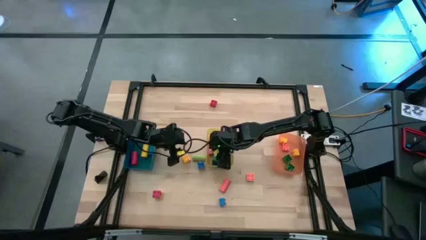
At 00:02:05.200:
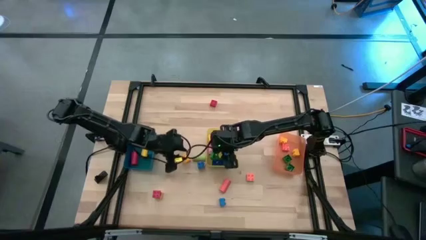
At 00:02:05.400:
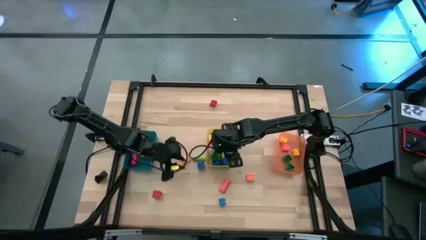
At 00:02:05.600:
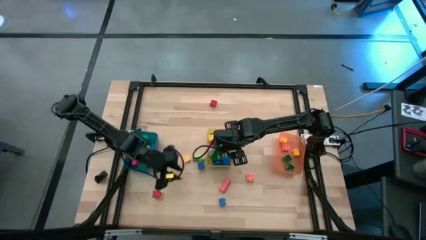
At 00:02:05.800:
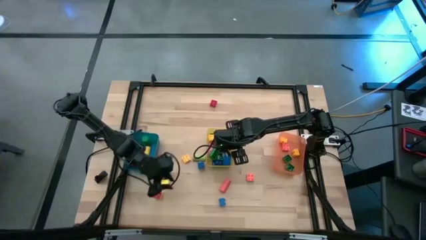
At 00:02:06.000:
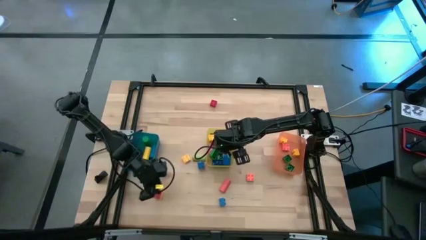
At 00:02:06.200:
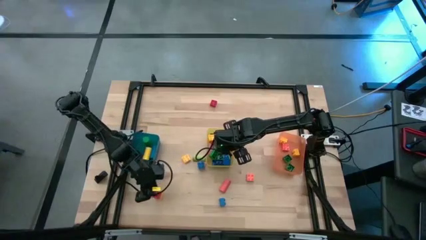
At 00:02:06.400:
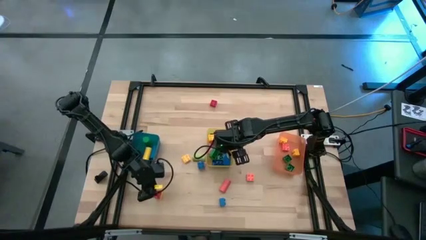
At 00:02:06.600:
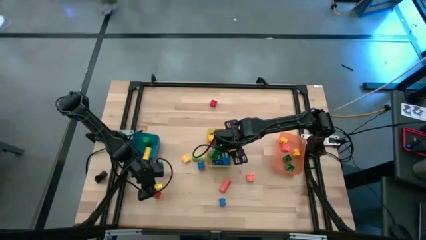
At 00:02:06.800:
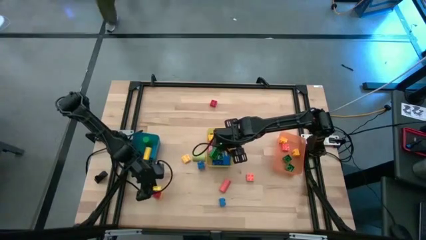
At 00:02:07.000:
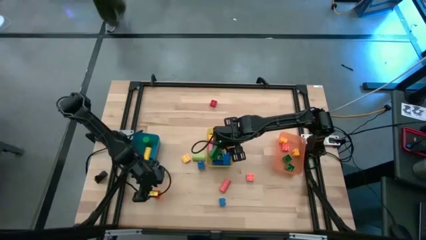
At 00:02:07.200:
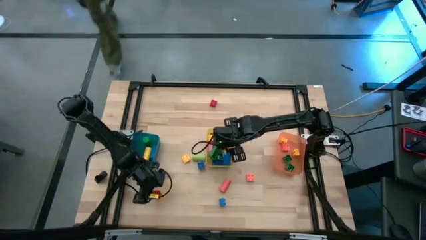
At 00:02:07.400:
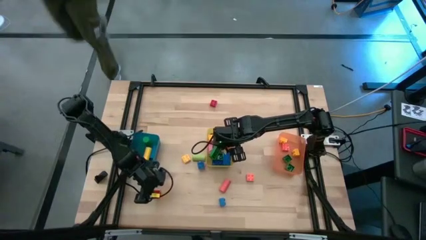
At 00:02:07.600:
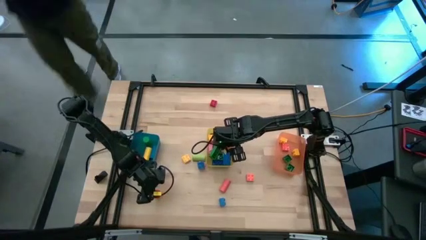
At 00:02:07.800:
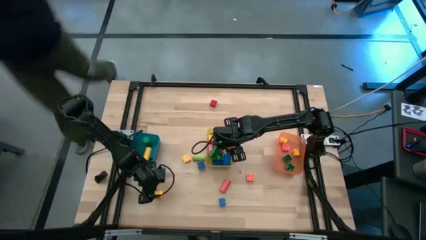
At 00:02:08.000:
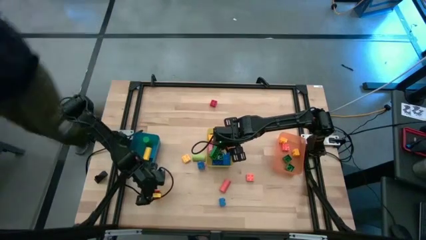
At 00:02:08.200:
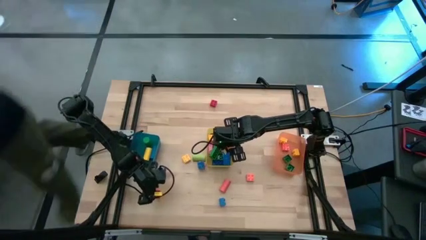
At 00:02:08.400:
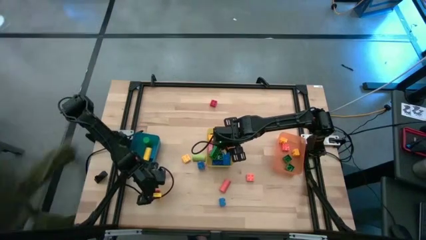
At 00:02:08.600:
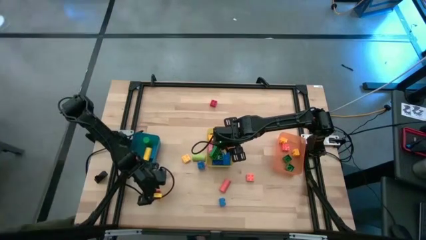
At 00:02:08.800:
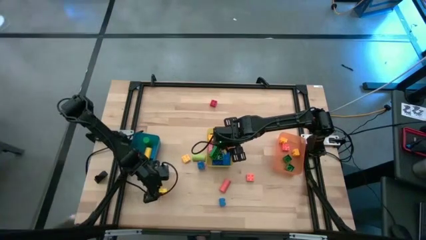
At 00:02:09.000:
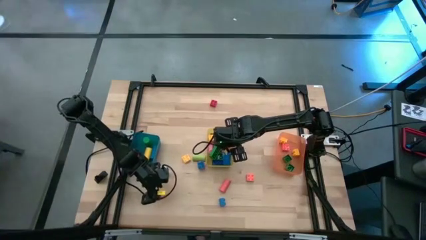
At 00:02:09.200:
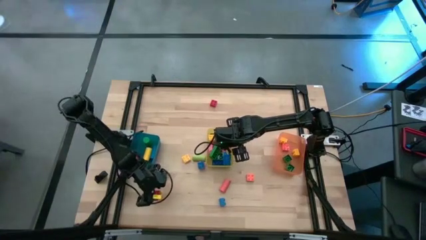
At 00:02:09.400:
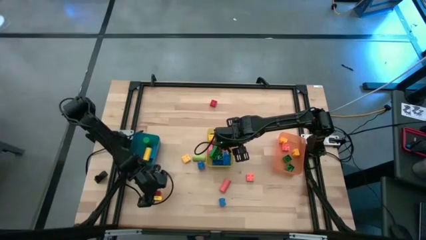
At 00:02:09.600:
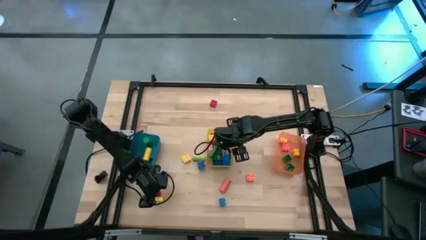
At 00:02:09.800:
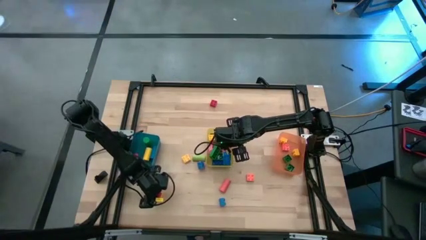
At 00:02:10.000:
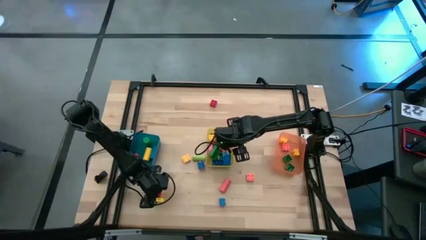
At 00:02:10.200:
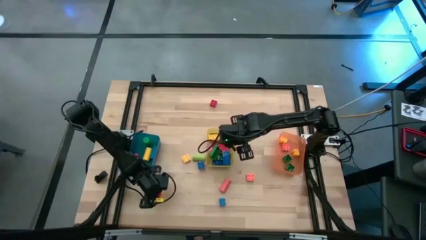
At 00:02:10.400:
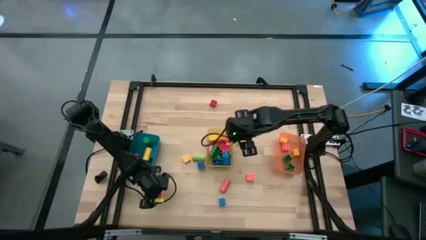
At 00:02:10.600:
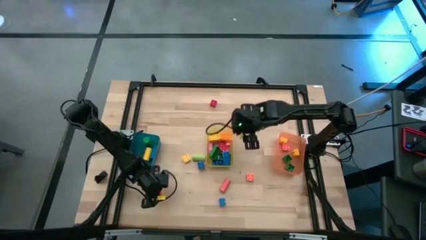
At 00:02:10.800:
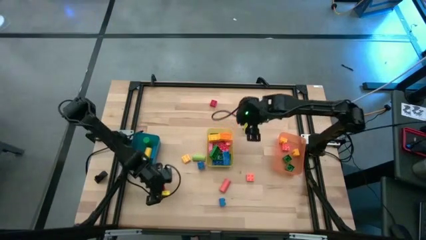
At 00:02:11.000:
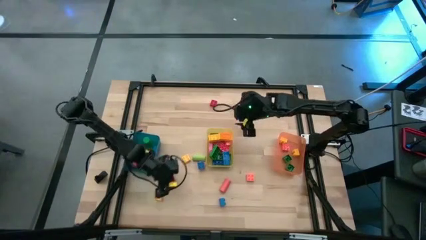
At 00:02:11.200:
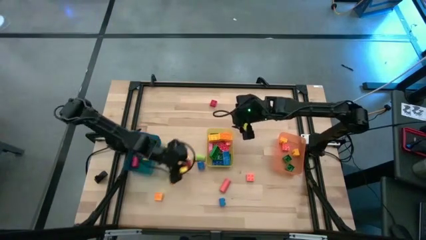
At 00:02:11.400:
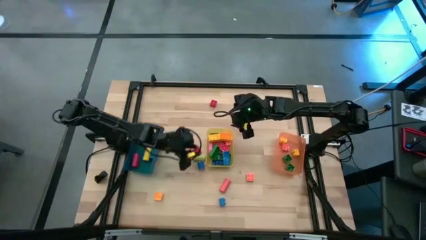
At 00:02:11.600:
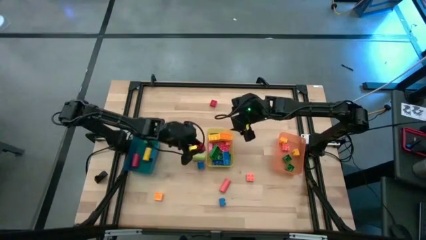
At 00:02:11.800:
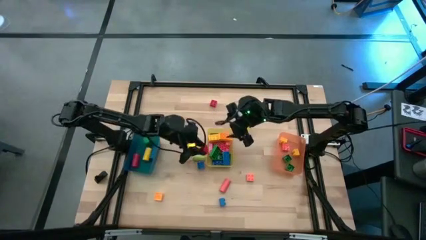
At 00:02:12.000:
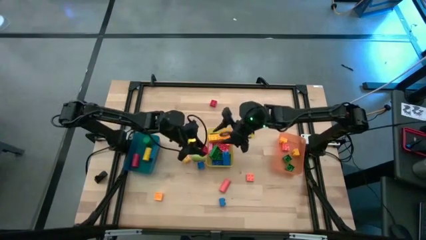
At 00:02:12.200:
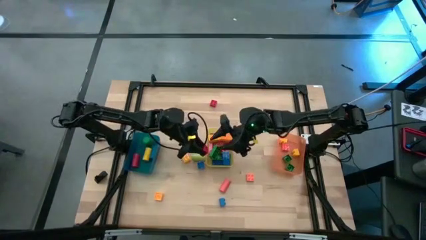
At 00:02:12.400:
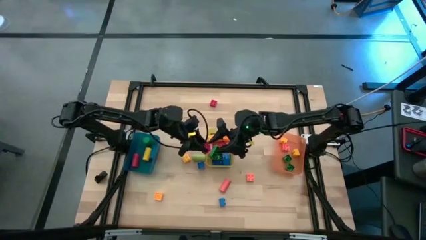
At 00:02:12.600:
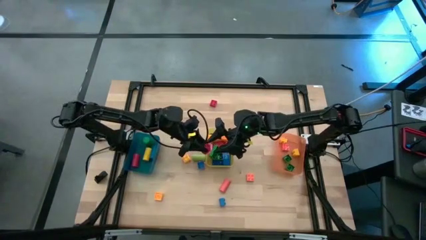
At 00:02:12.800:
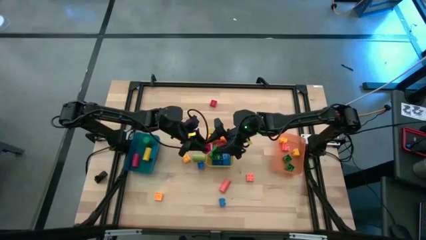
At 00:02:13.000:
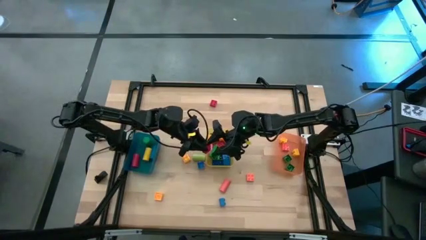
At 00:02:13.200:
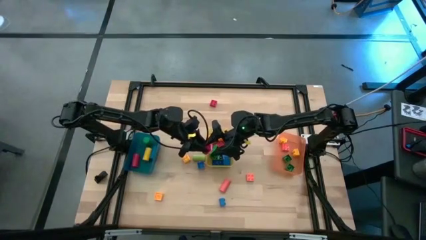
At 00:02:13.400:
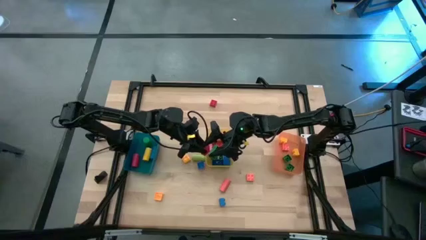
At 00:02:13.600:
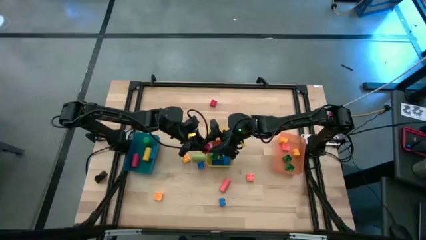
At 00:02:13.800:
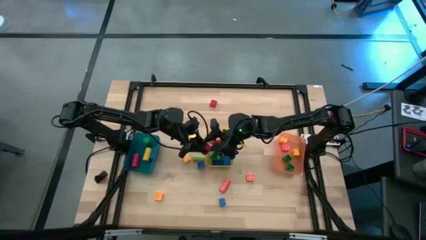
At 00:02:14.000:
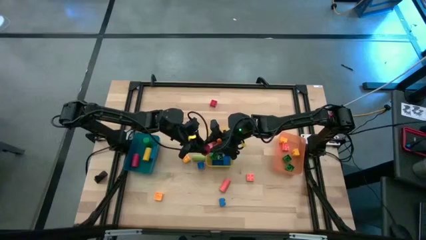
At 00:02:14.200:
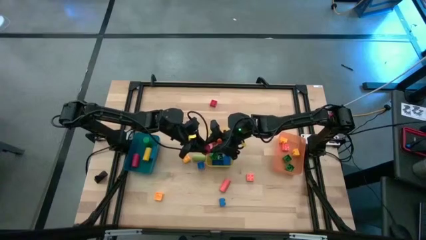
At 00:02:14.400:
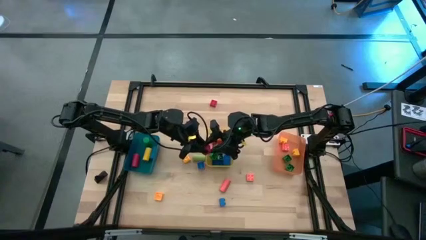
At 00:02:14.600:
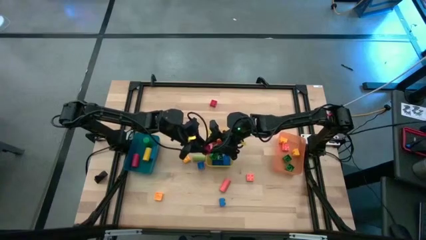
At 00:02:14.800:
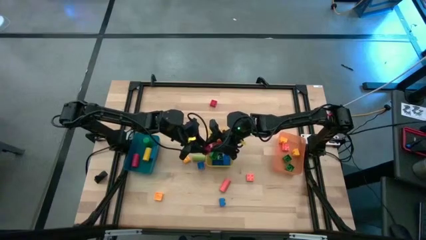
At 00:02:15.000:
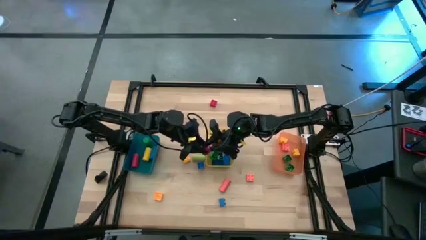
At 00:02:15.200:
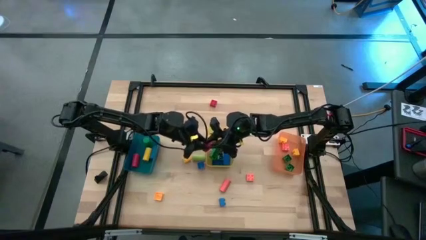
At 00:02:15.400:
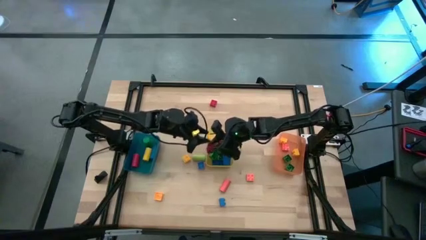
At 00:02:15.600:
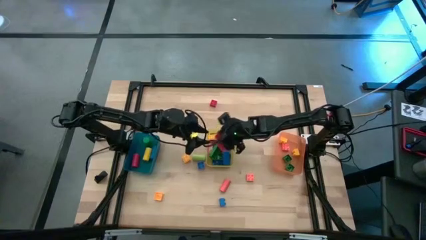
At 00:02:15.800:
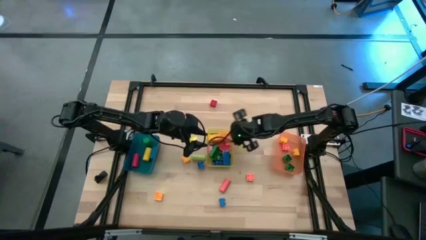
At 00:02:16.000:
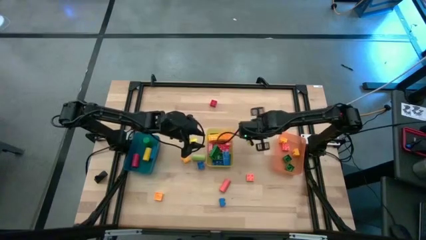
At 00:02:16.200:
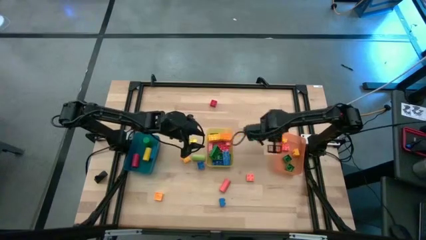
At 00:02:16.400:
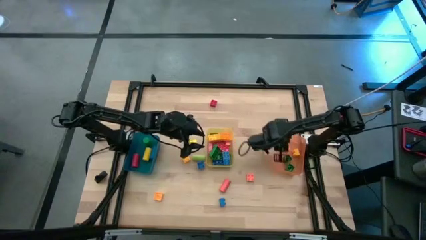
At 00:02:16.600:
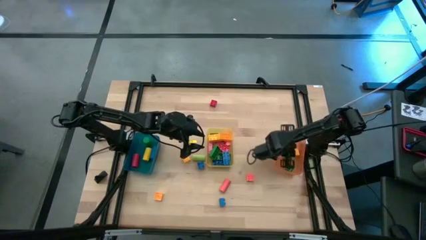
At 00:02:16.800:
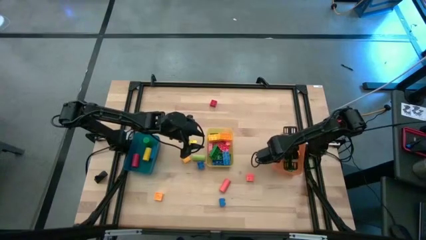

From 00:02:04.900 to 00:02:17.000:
Task: Sort blocks by size
Put the red 4 stud game piece into the orange bin

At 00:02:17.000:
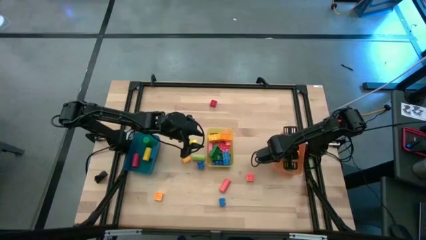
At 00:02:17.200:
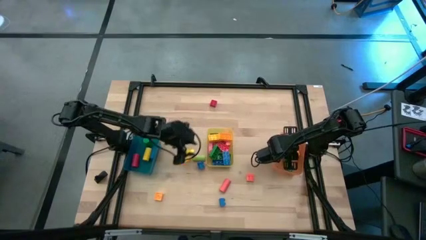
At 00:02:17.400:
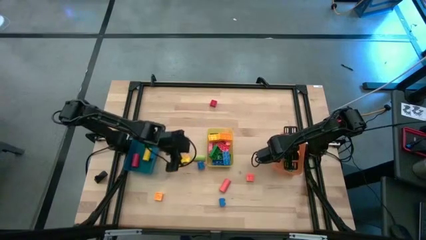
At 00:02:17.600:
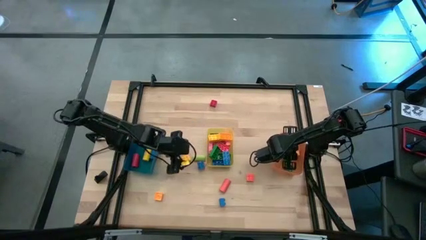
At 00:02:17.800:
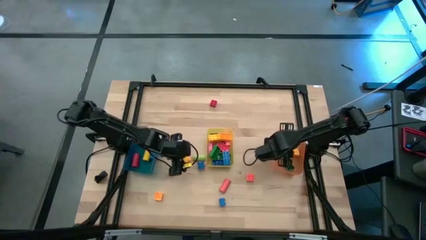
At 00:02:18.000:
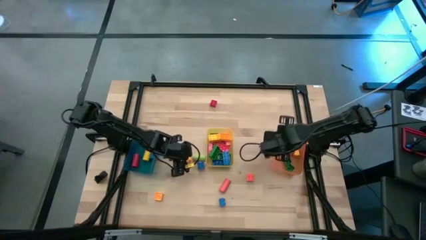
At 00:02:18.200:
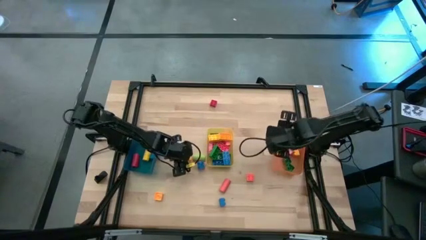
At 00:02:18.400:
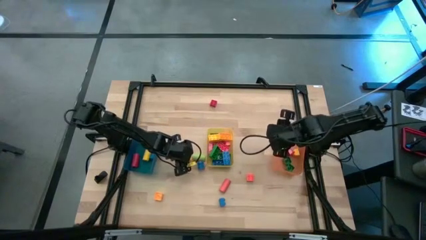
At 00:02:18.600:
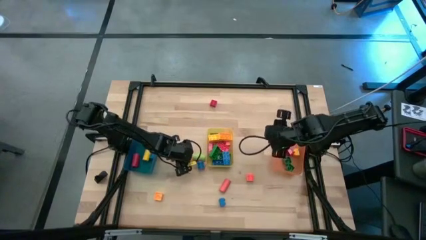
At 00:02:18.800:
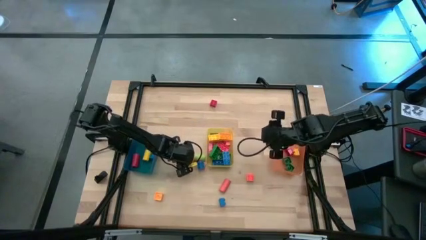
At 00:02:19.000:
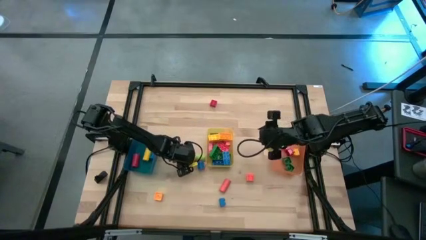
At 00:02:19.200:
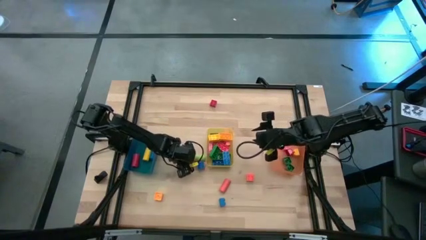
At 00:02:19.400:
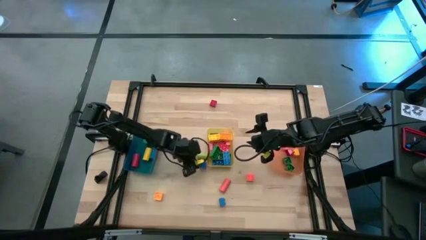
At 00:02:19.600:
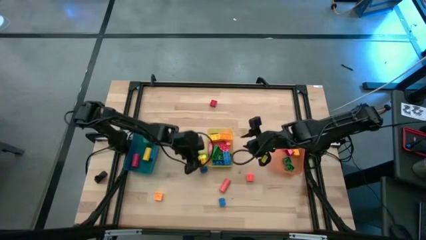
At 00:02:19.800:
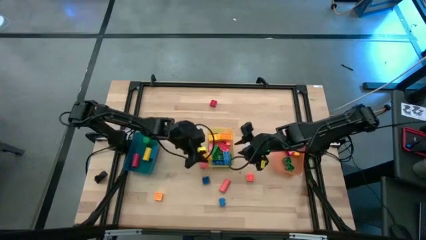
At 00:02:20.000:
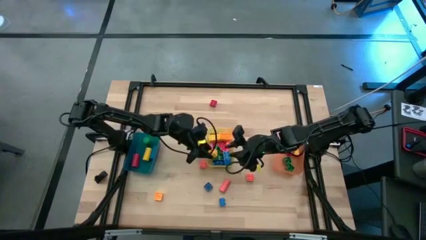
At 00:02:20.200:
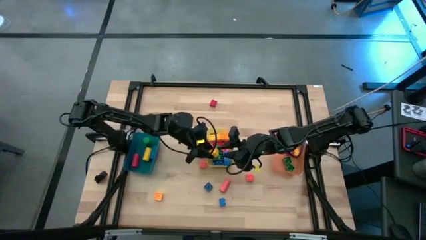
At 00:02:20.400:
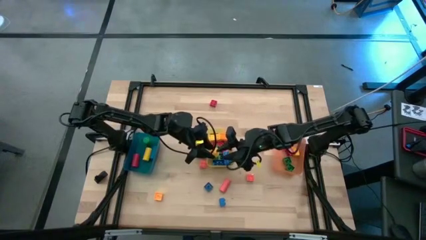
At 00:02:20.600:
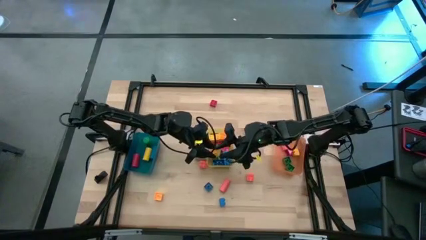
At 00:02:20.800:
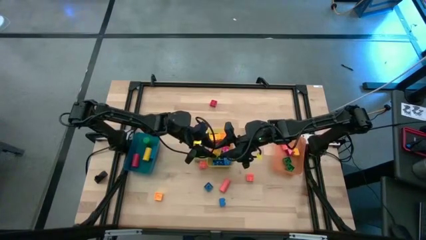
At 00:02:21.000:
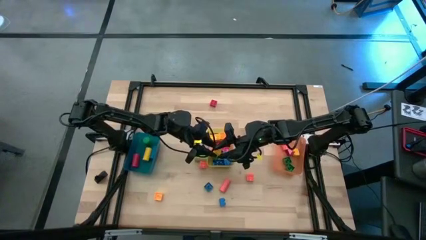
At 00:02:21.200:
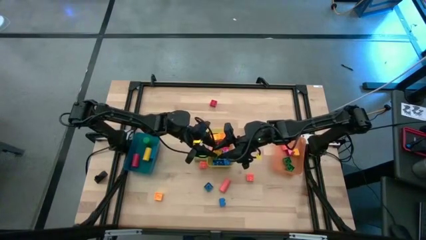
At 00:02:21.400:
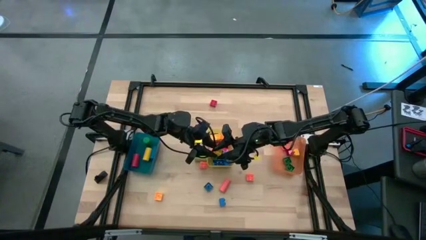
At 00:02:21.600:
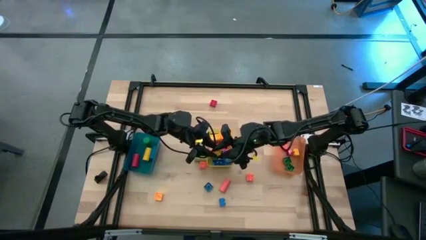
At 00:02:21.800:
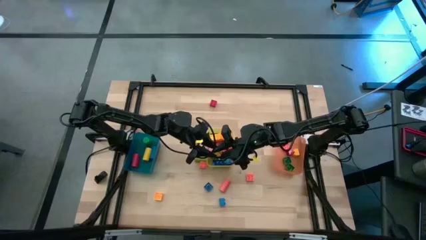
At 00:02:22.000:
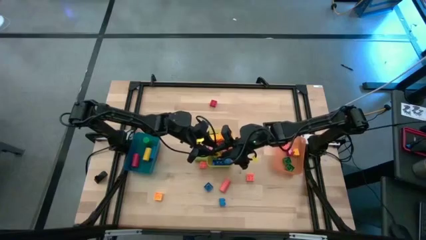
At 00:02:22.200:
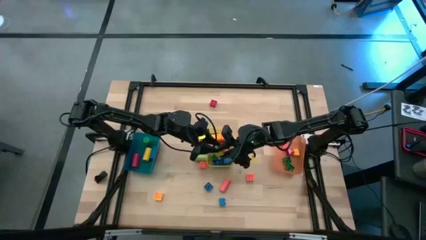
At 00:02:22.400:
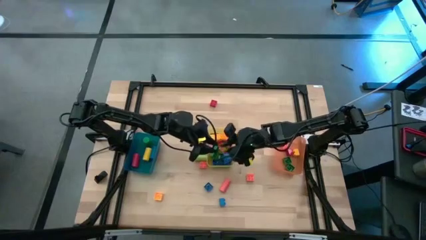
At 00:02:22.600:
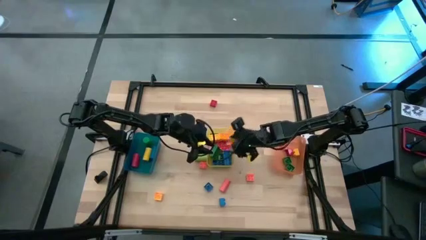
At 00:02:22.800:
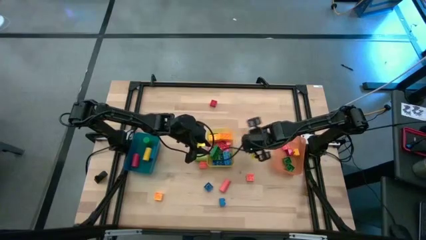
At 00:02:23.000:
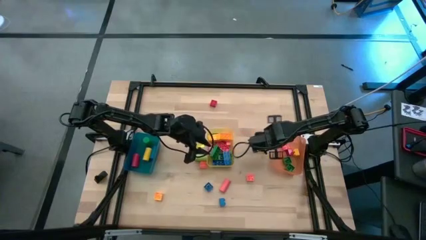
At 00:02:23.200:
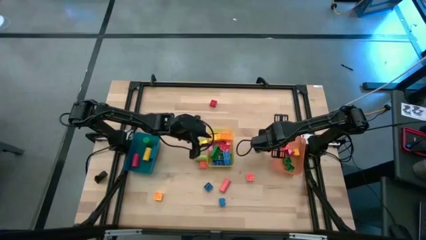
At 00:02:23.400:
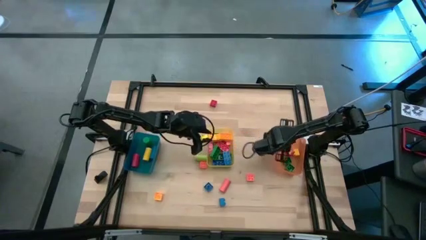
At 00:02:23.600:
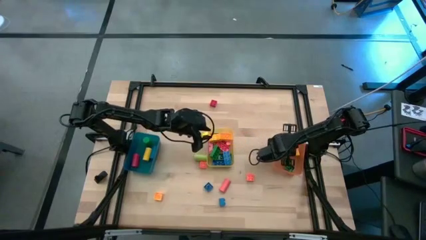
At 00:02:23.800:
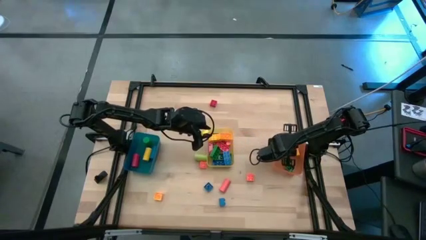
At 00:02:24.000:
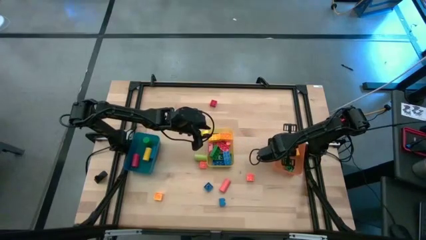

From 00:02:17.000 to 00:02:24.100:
Put the yellow 4 stud game piece into the orange bin
